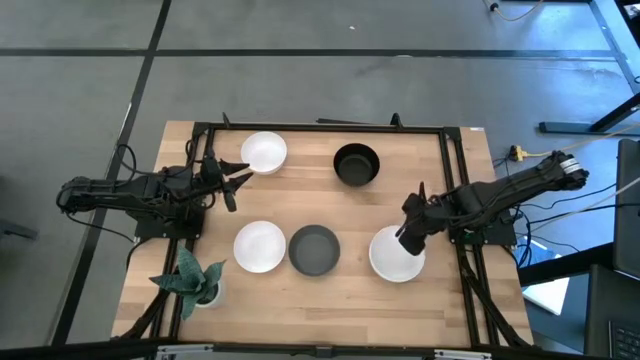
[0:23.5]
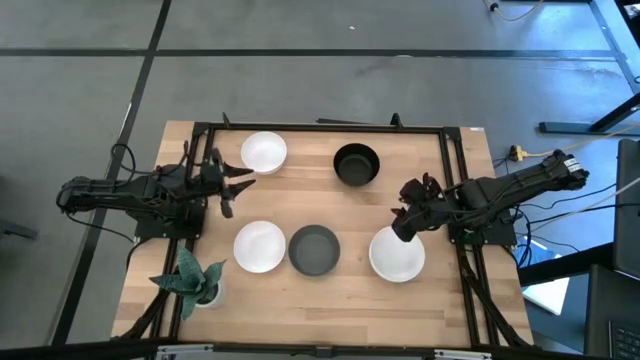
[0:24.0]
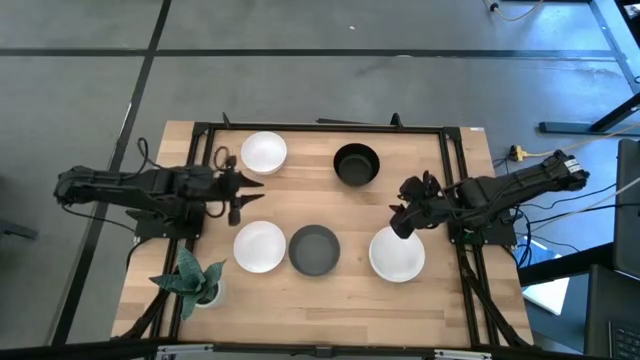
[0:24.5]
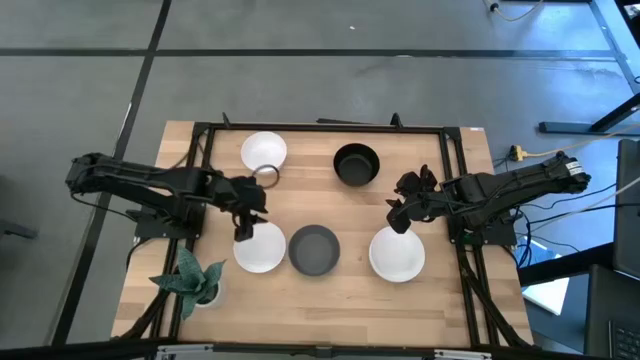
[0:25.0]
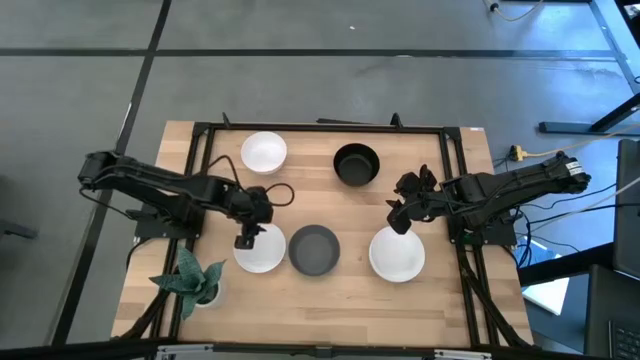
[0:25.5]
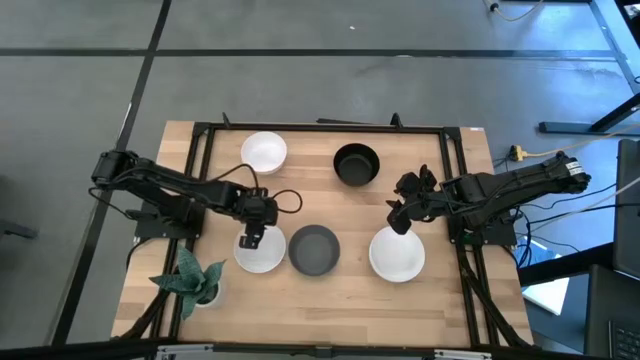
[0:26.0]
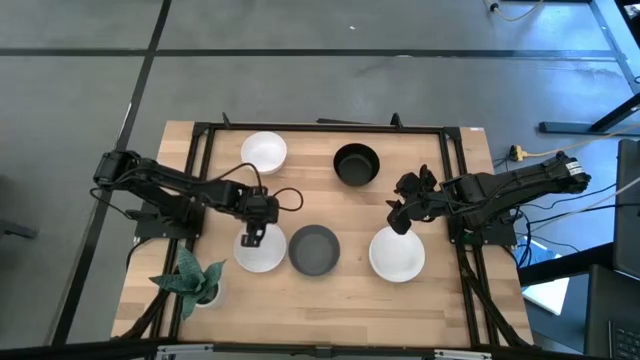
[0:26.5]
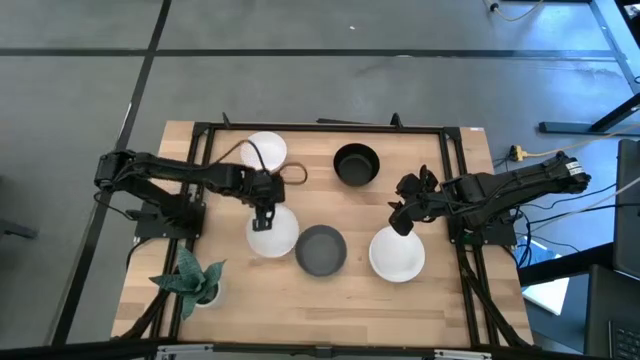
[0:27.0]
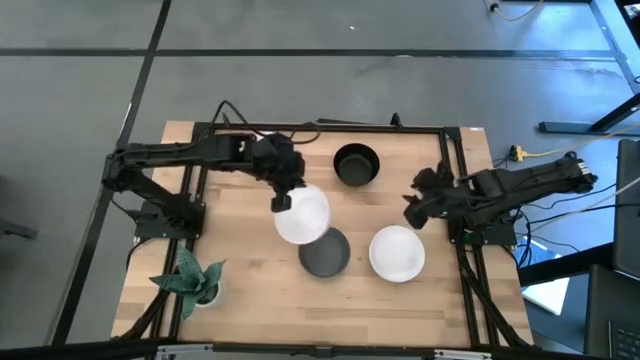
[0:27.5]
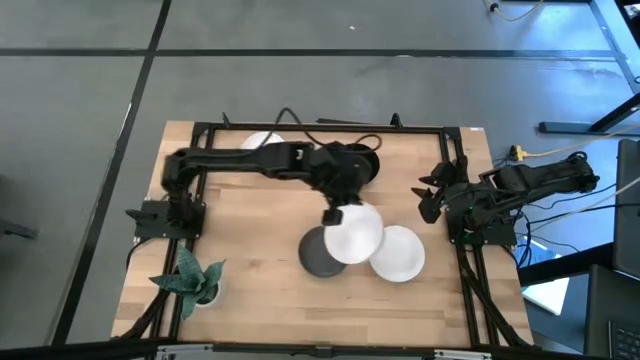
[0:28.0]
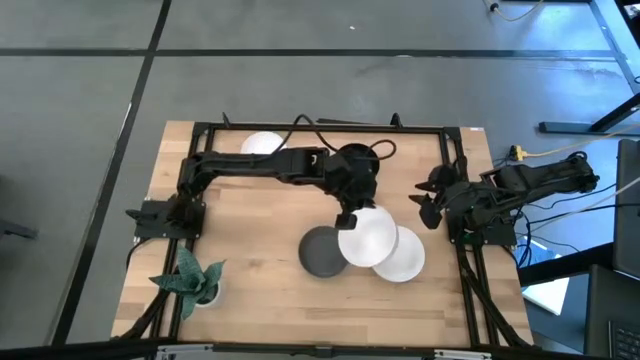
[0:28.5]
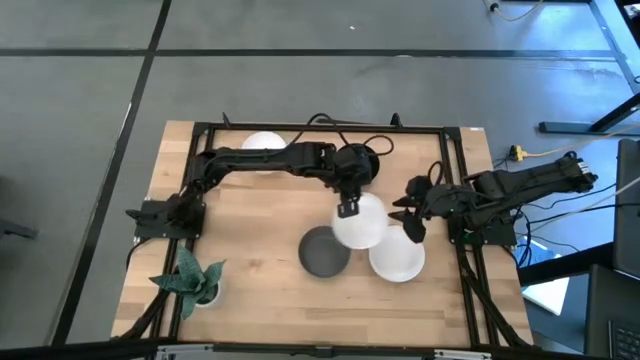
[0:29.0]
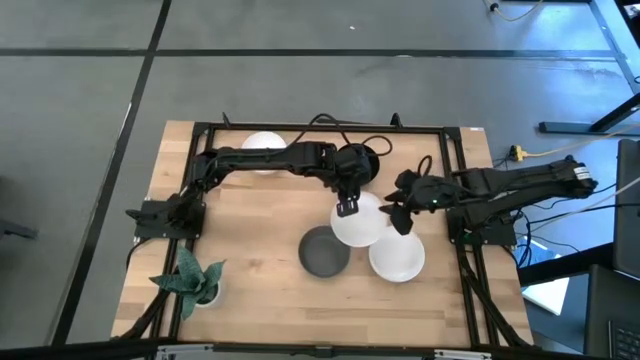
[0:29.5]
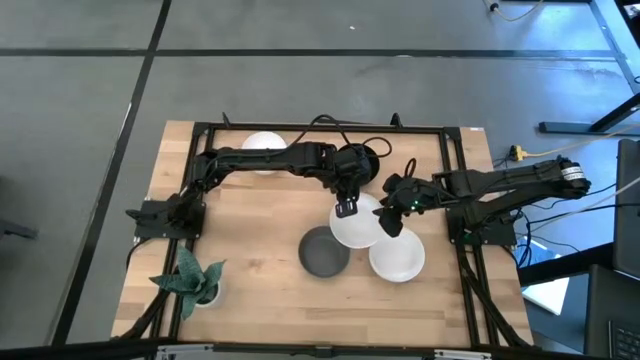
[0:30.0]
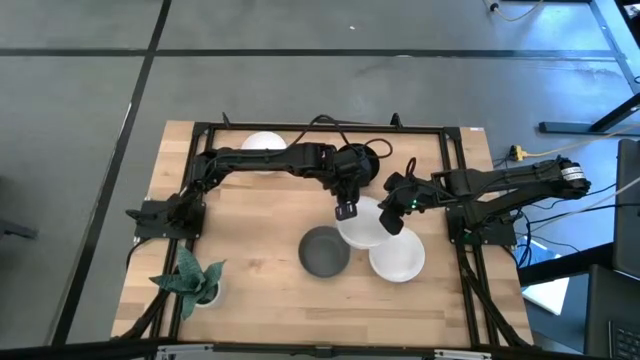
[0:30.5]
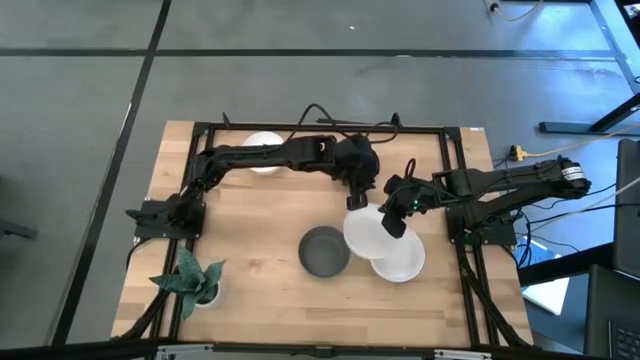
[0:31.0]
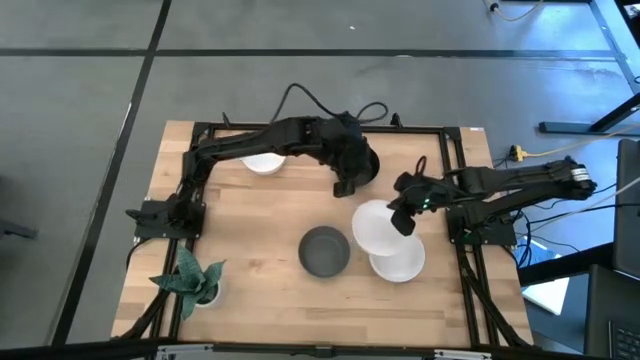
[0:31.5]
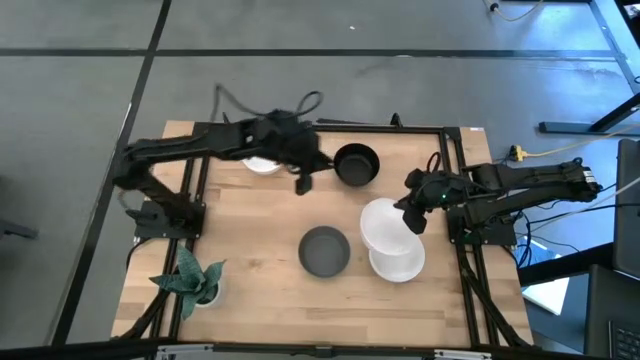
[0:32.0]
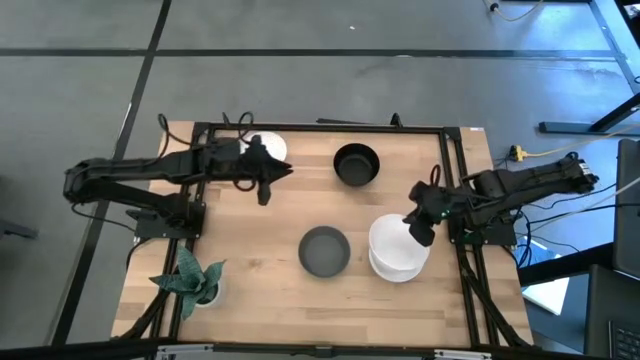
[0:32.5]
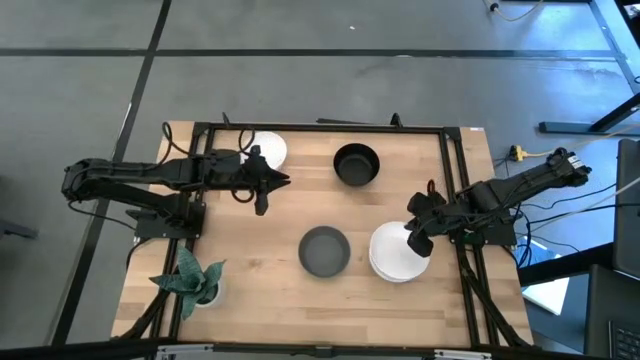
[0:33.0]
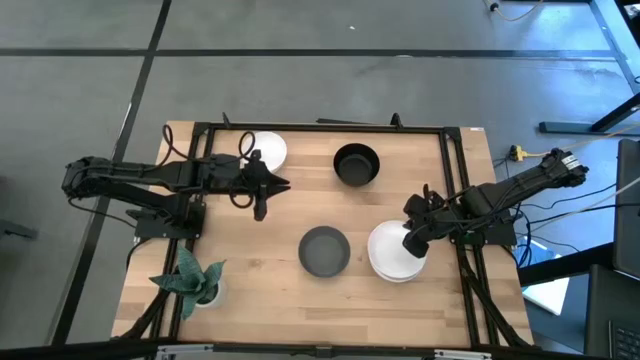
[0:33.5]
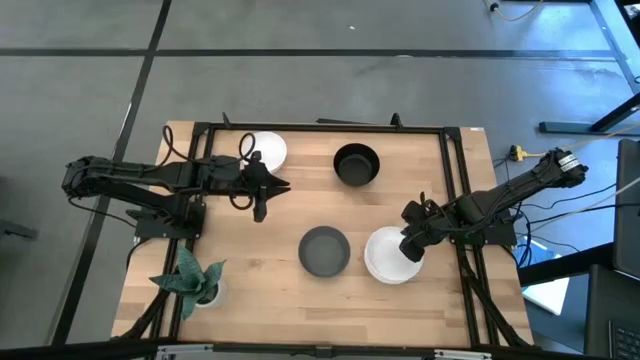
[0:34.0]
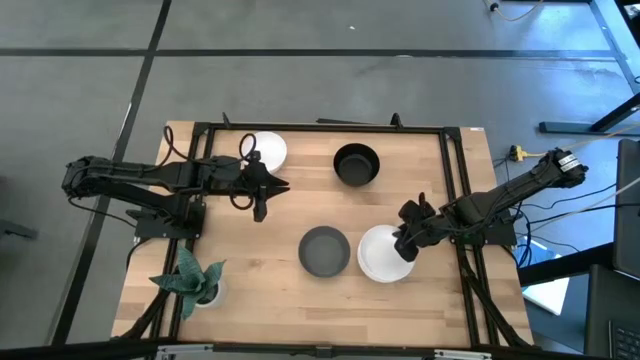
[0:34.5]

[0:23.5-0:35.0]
Task: Nest bowls inside each other
Stack the white bowl on the white bowl

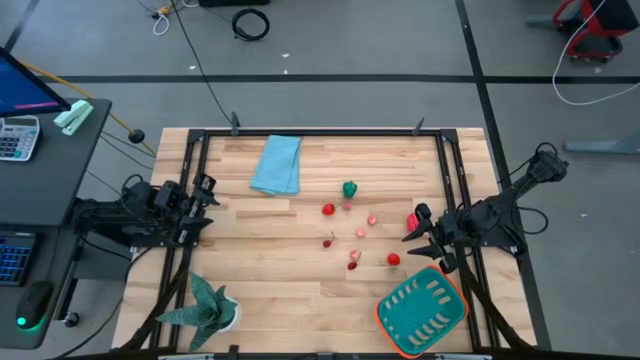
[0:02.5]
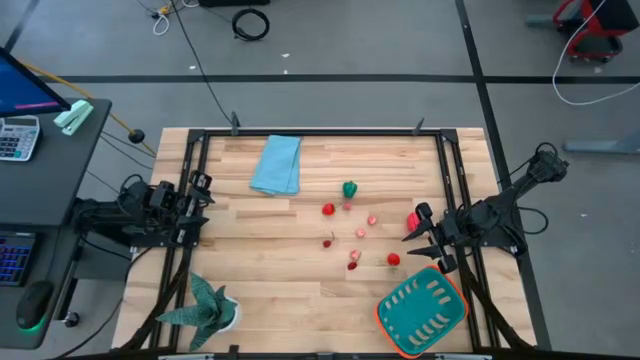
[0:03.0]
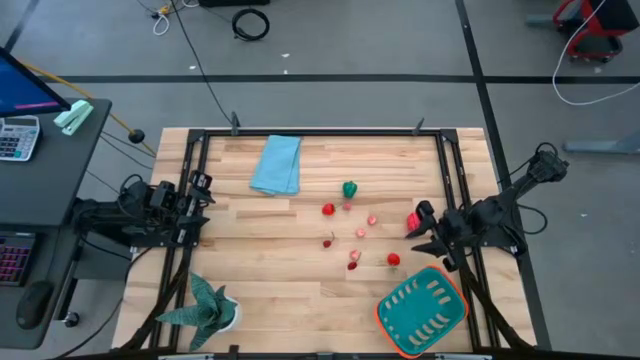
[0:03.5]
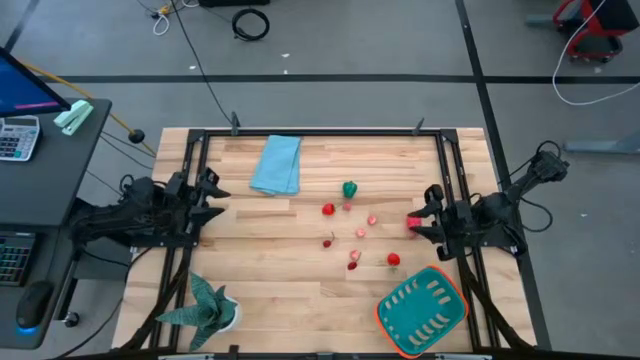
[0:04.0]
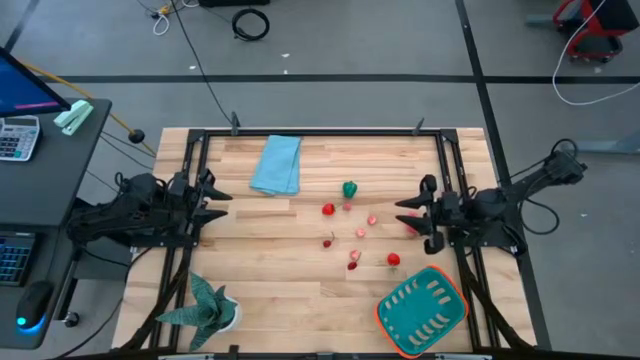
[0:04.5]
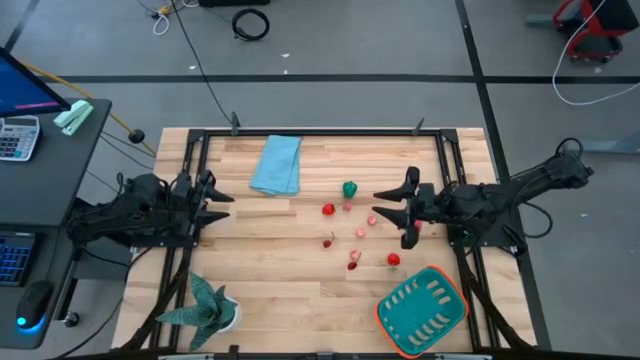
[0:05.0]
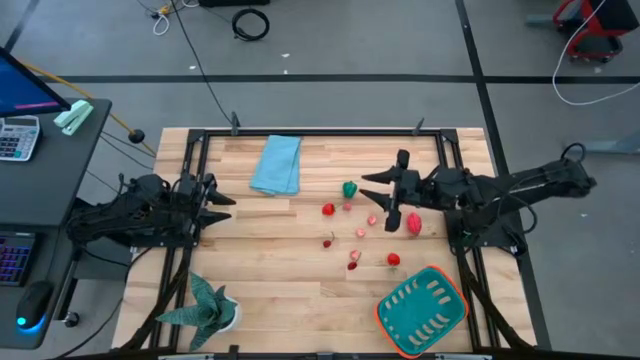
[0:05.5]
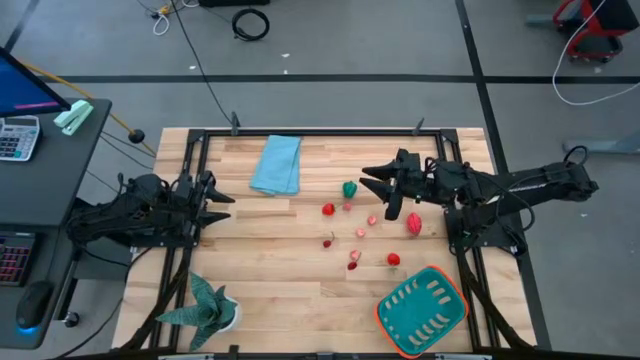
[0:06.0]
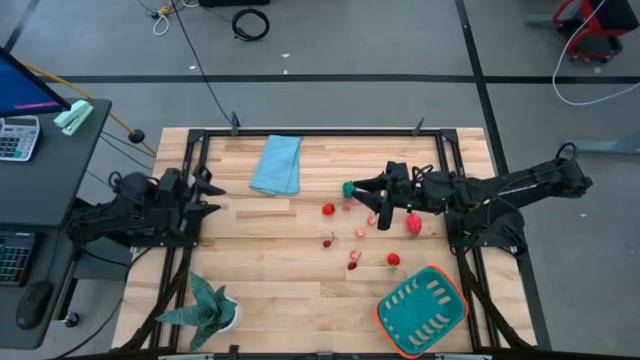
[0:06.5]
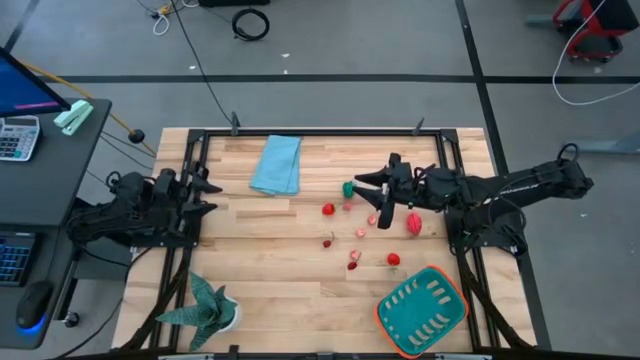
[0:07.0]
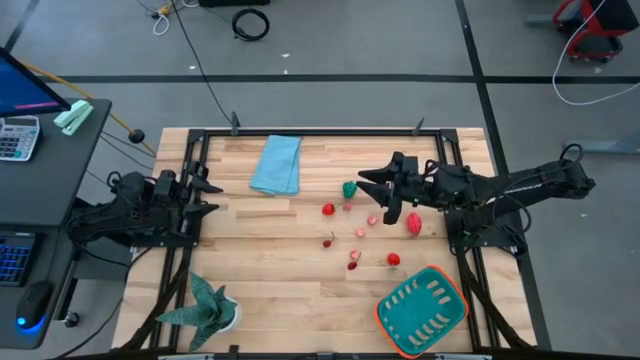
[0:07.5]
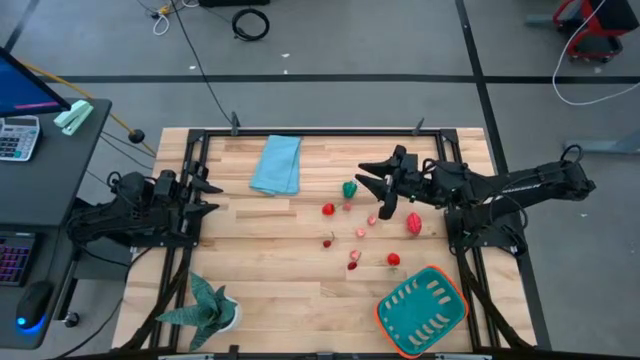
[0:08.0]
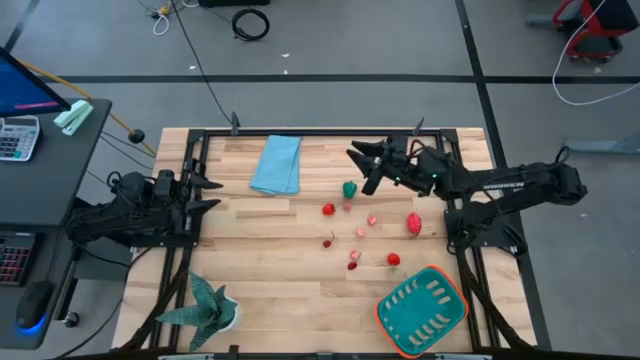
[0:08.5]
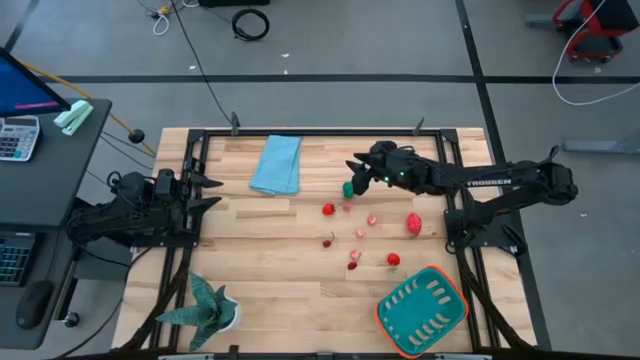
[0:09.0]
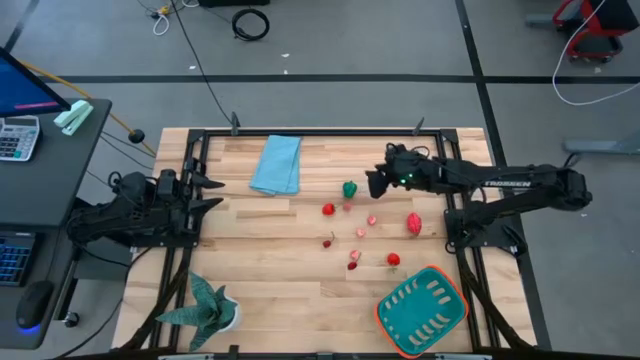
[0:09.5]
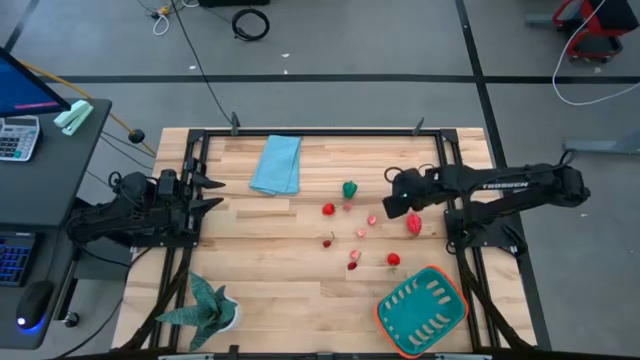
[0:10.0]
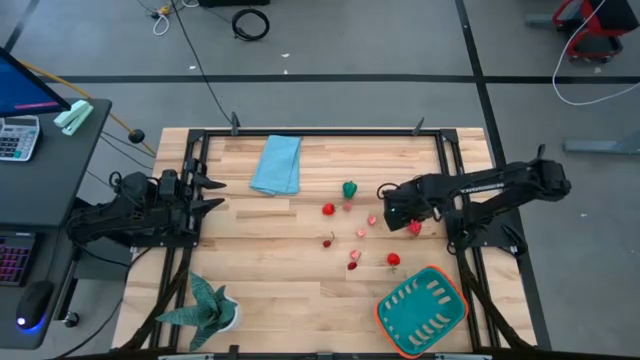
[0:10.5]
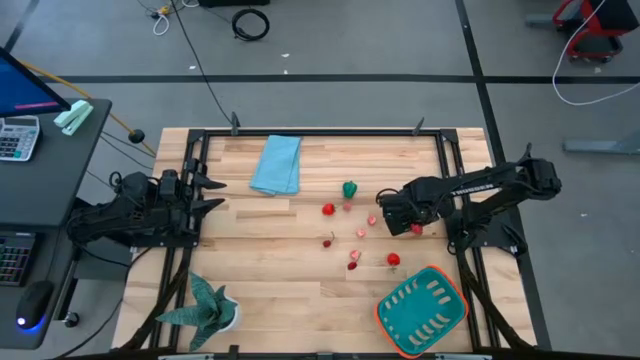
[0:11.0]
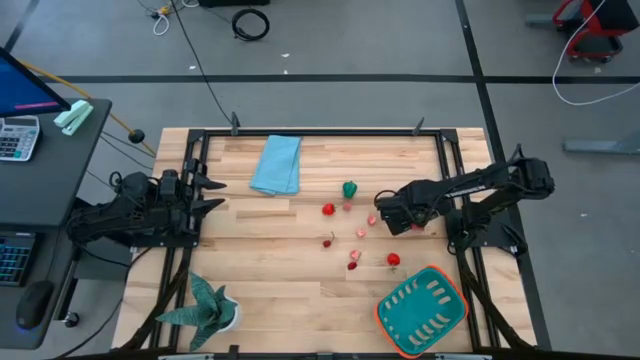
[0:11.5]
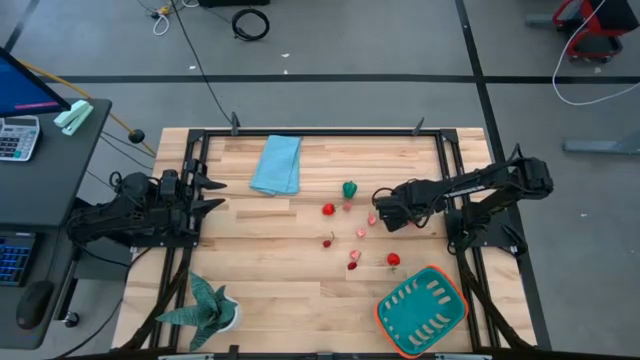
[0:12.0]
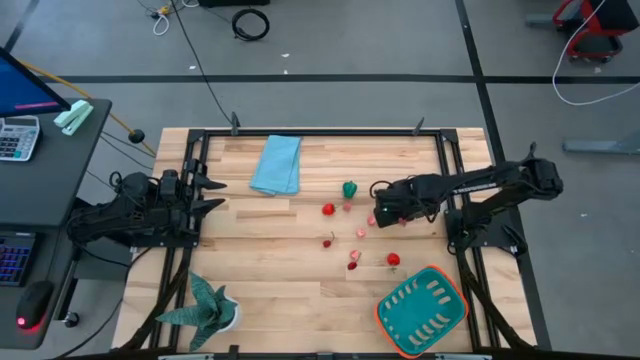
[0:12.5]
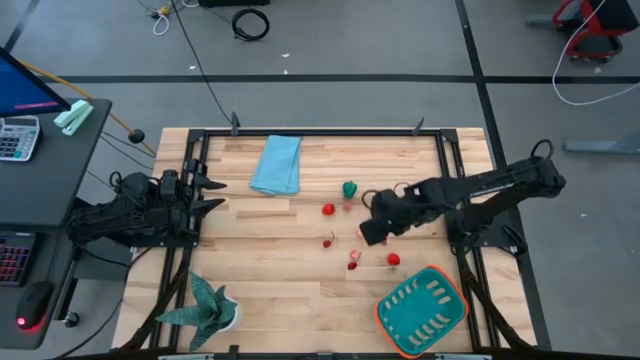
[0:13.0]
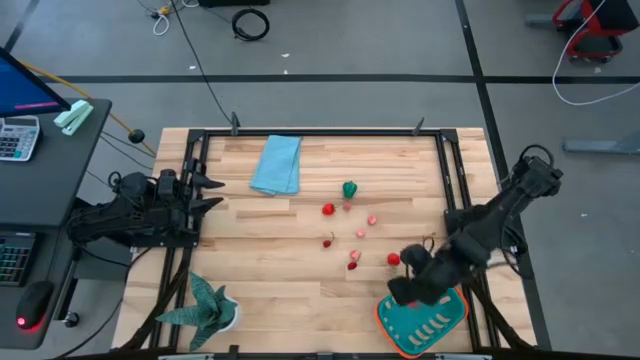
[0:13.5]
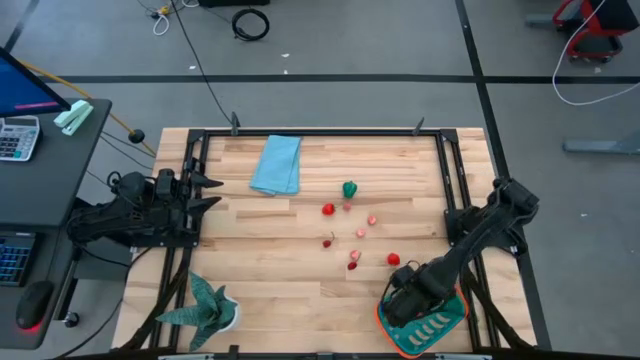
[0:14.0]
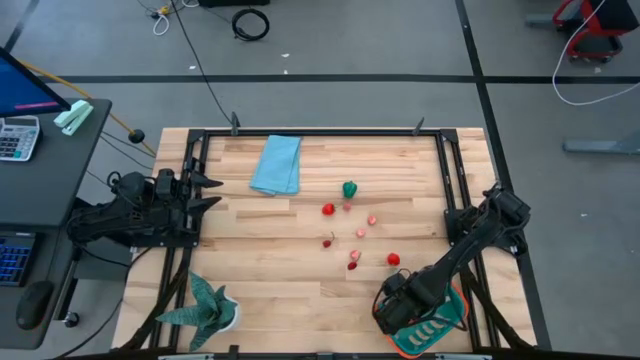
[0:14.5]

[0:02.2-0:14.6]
Task: Pick and placing Produce into tupperware
Put the red dragonfruit into the blue basket
